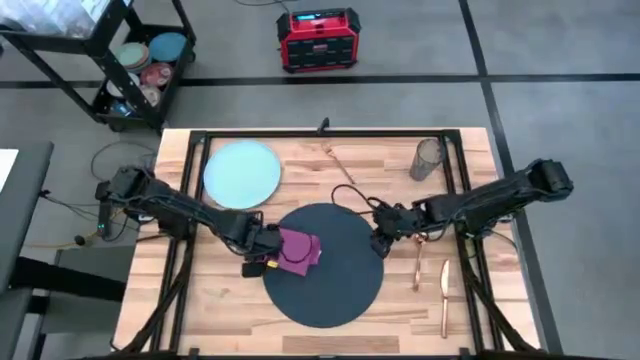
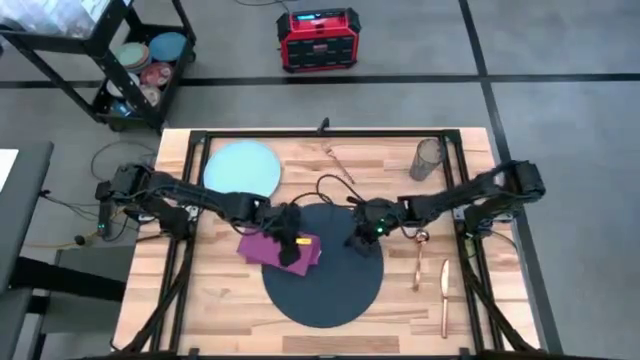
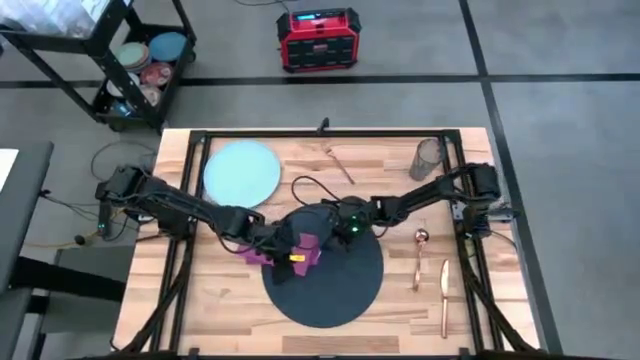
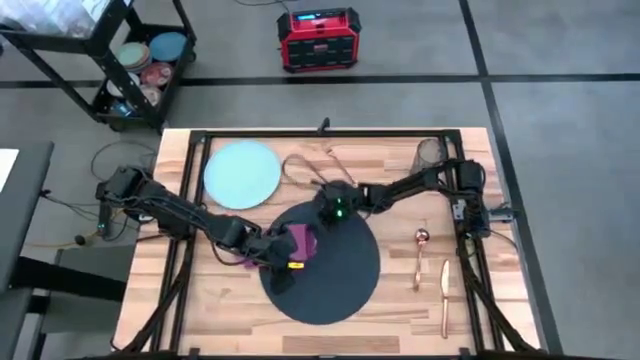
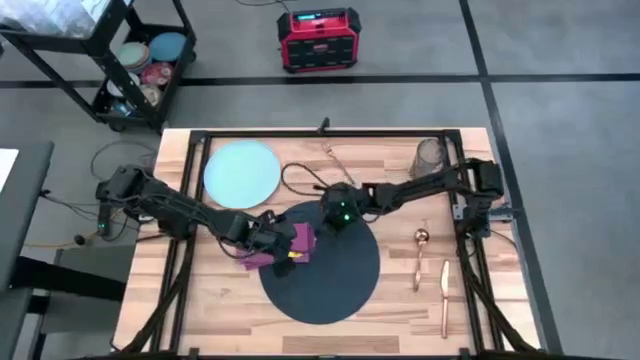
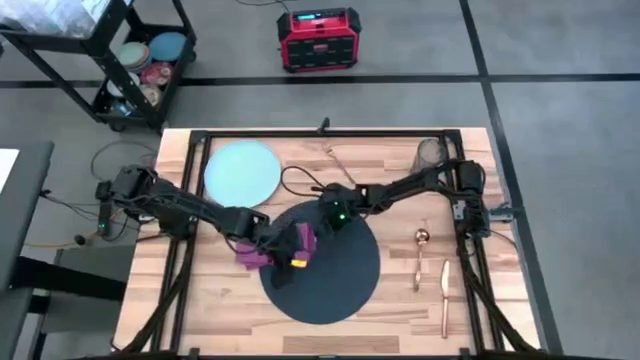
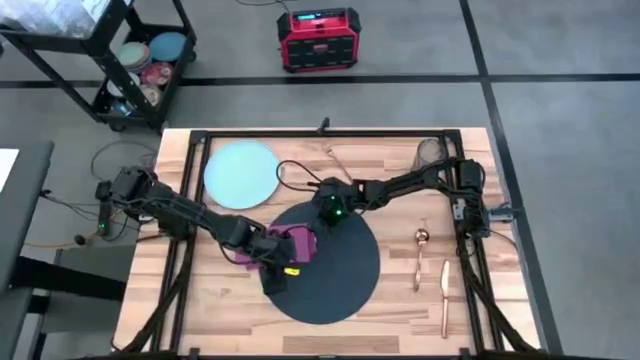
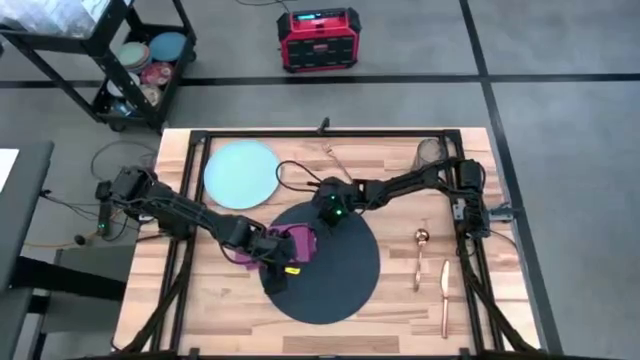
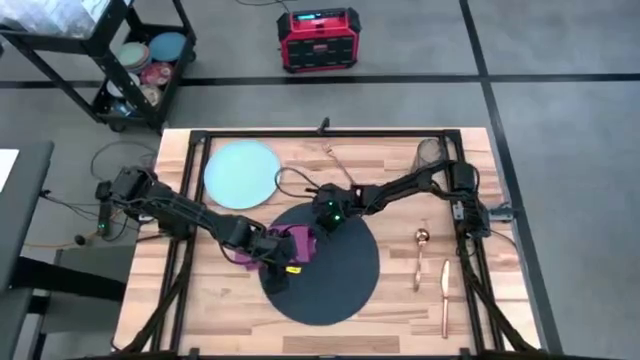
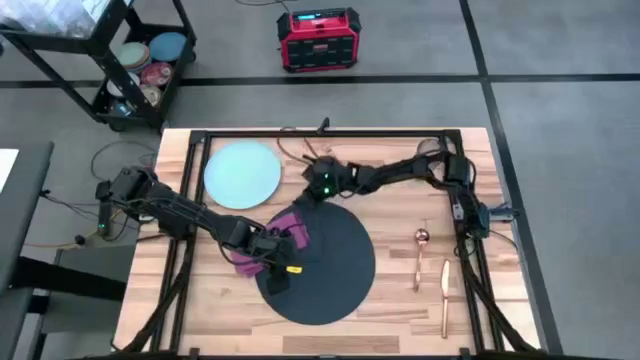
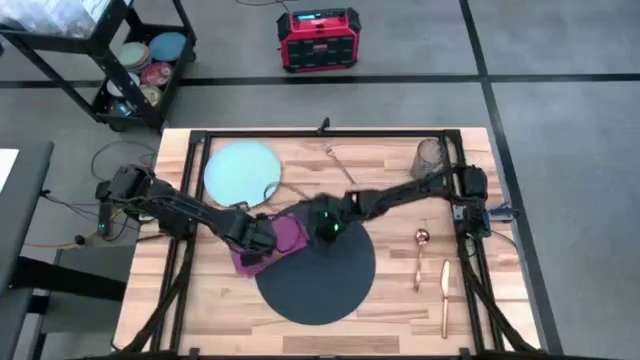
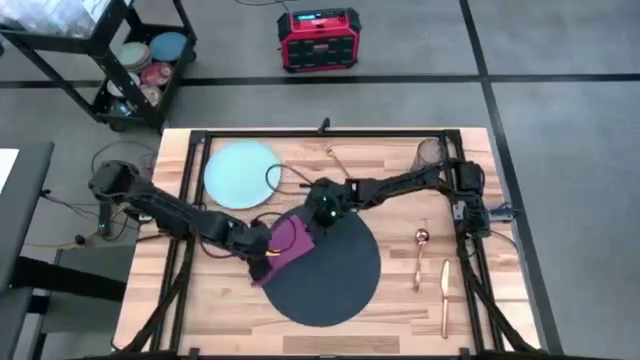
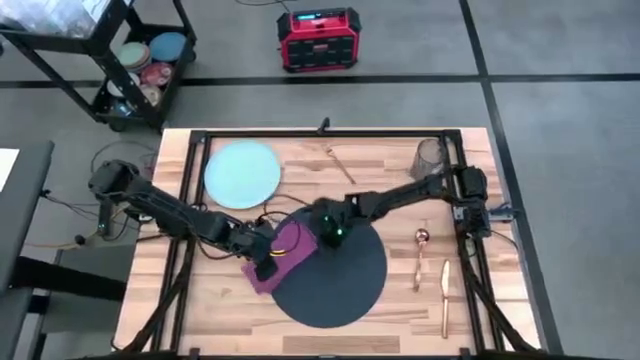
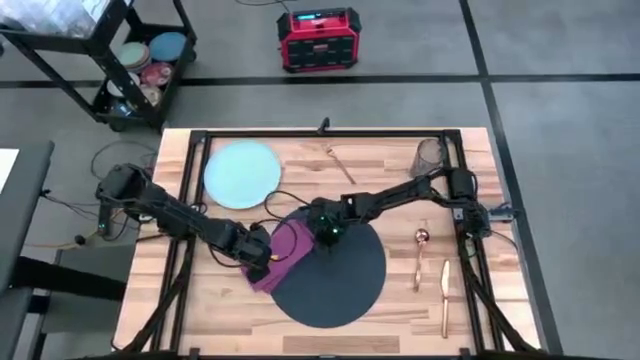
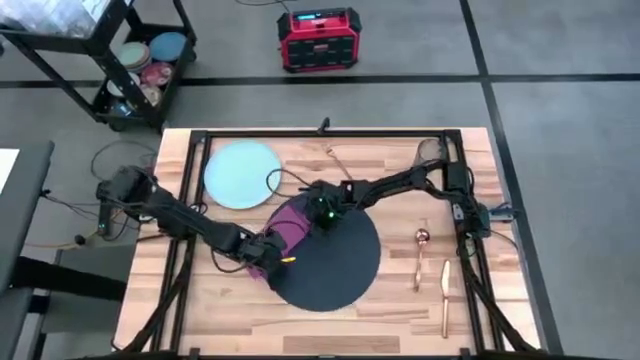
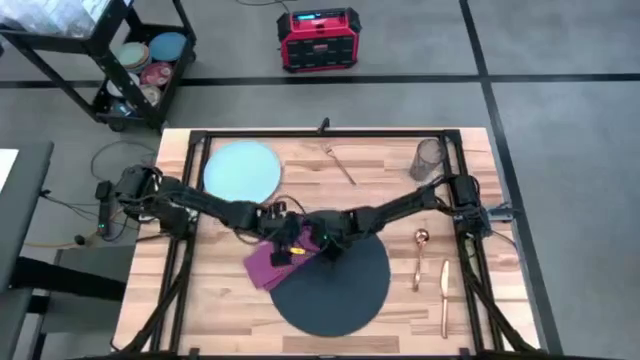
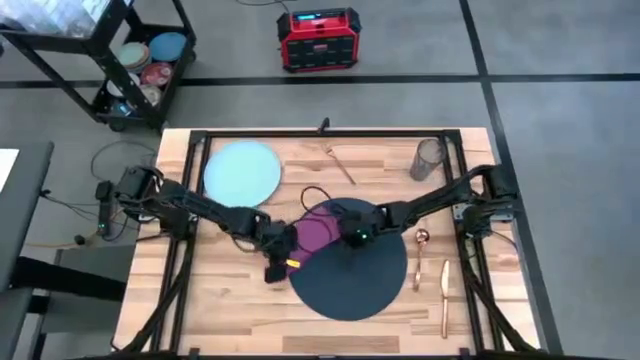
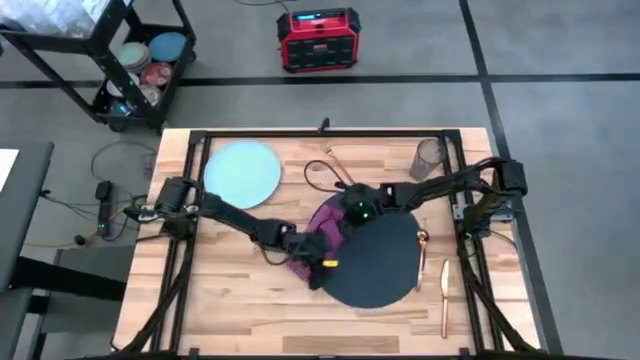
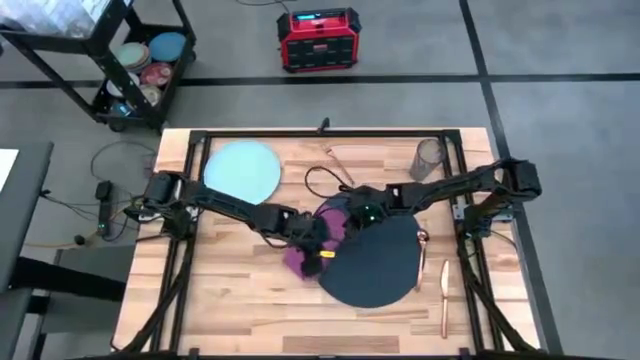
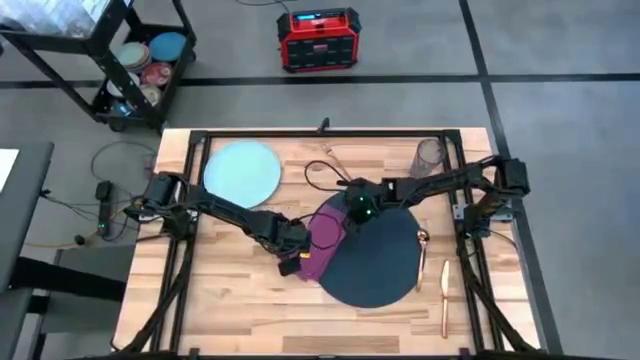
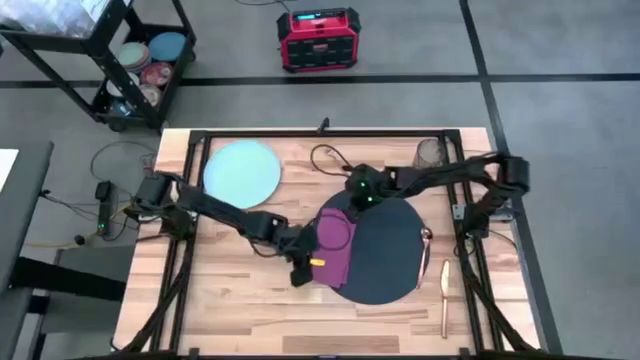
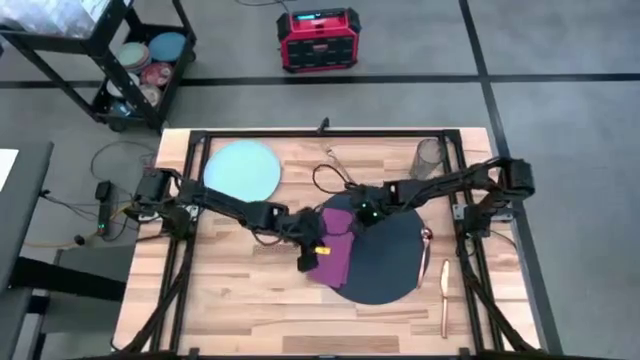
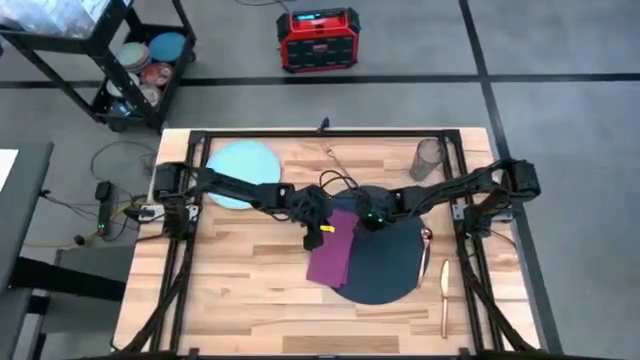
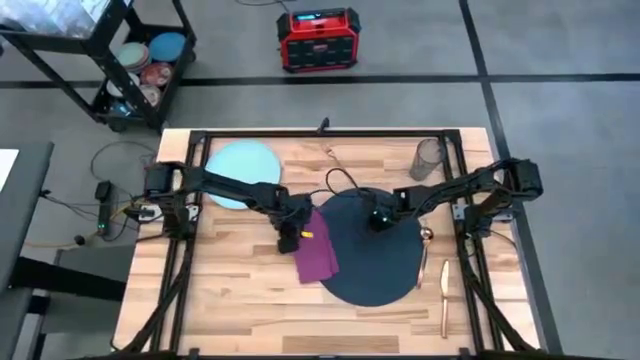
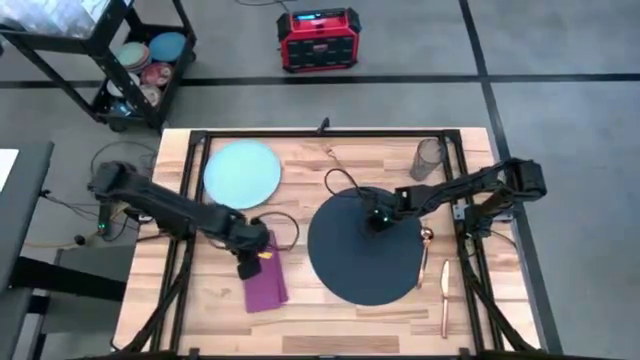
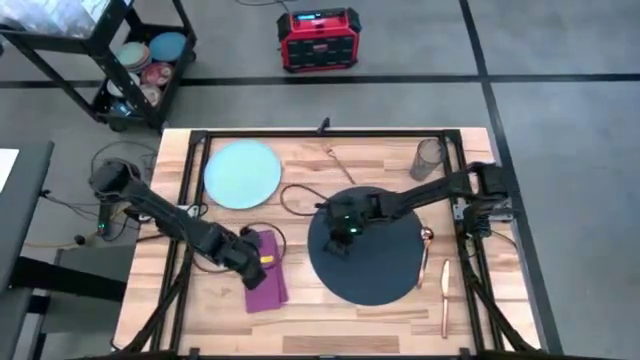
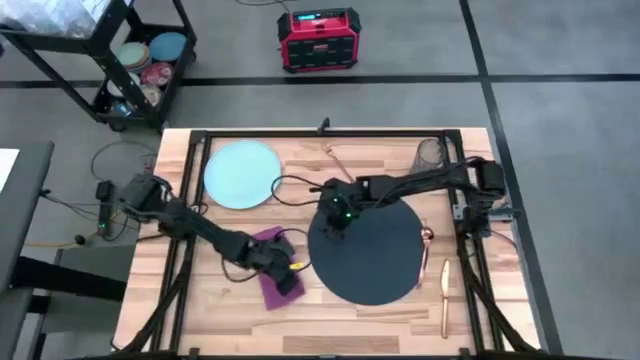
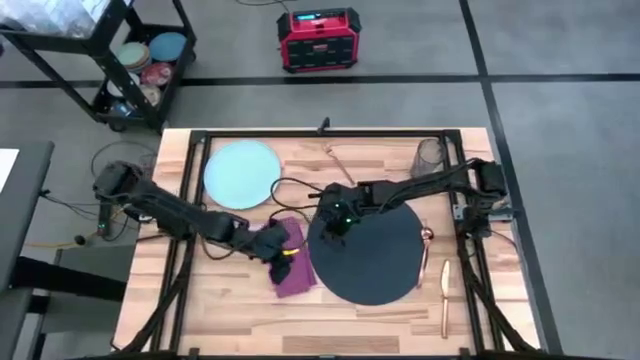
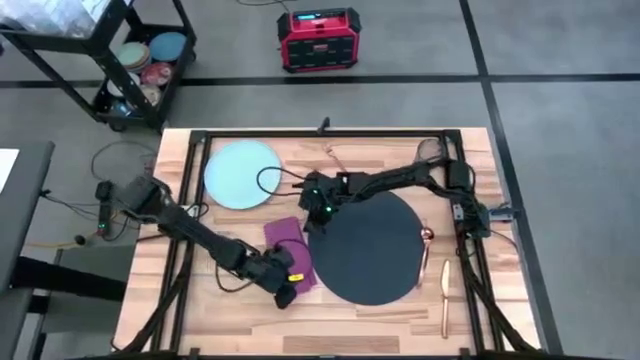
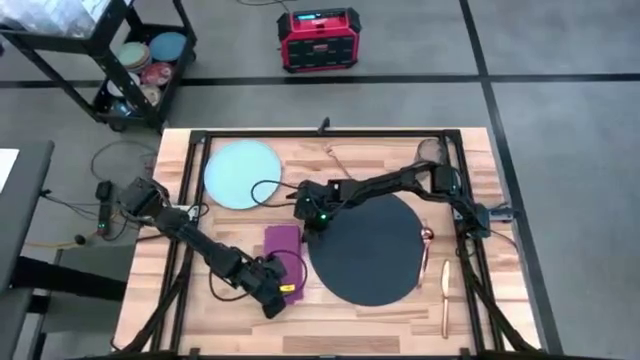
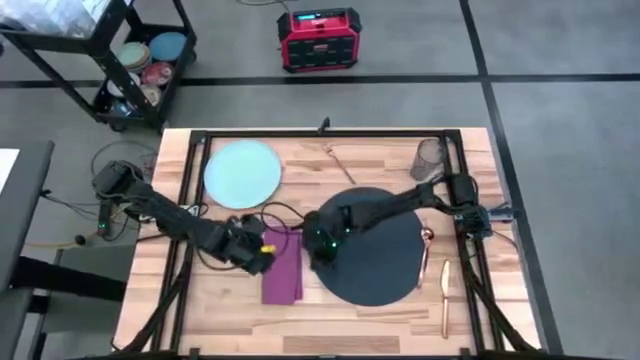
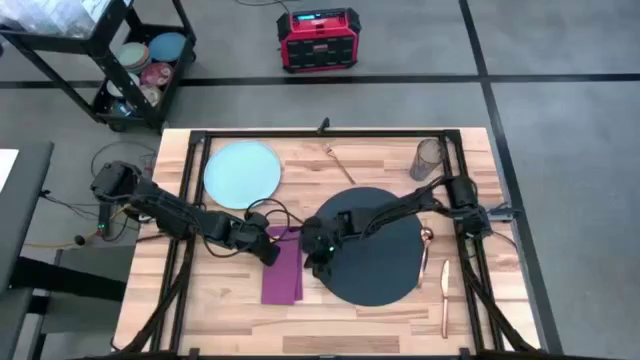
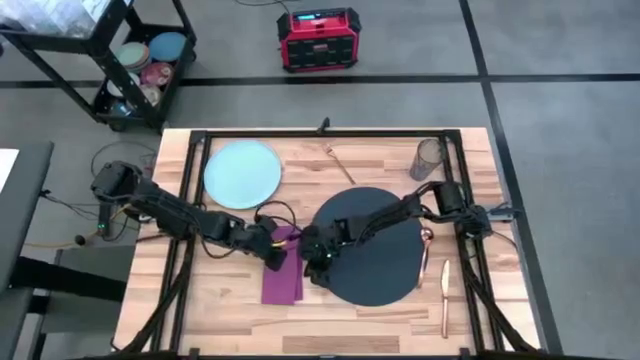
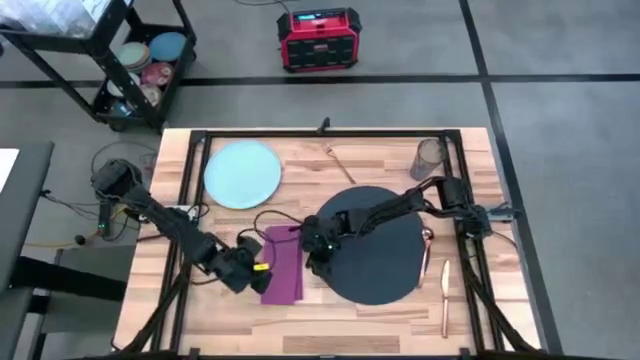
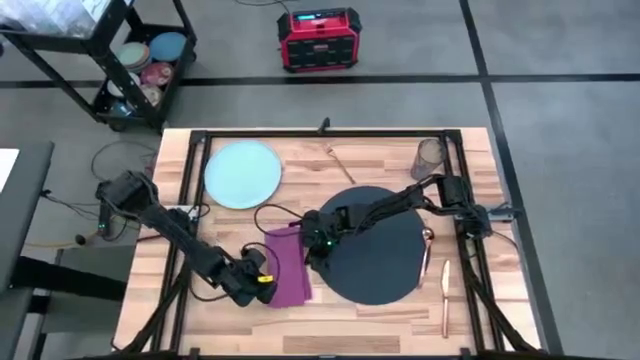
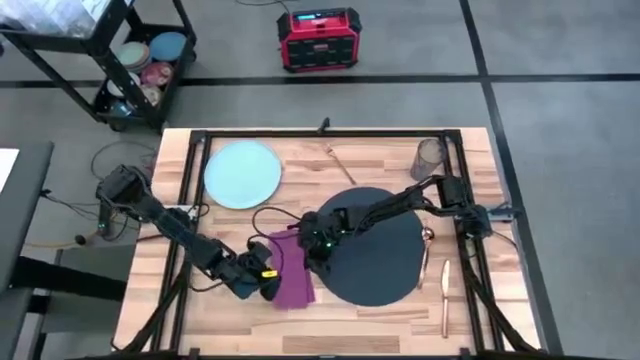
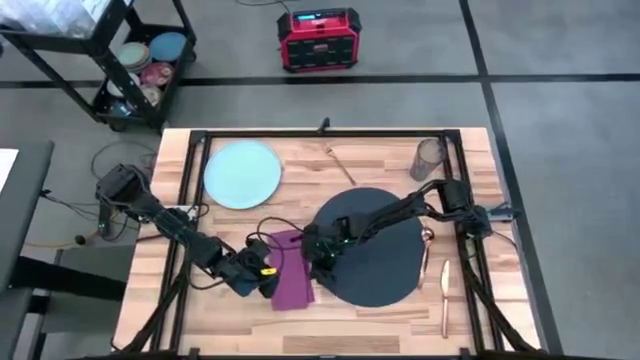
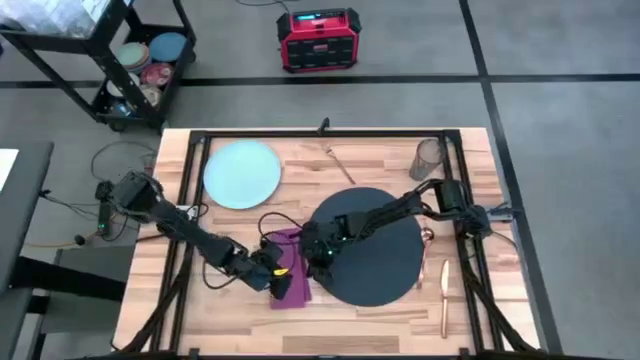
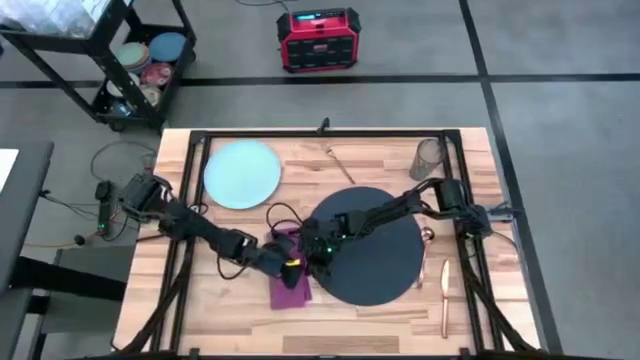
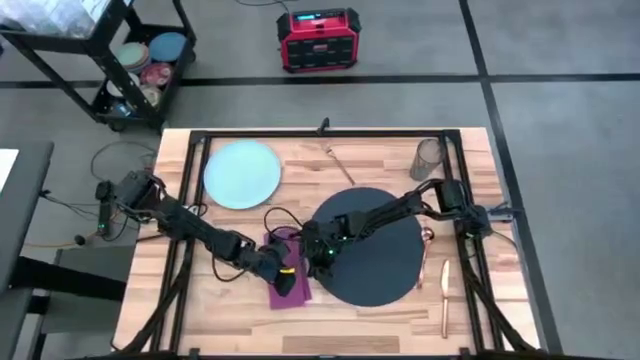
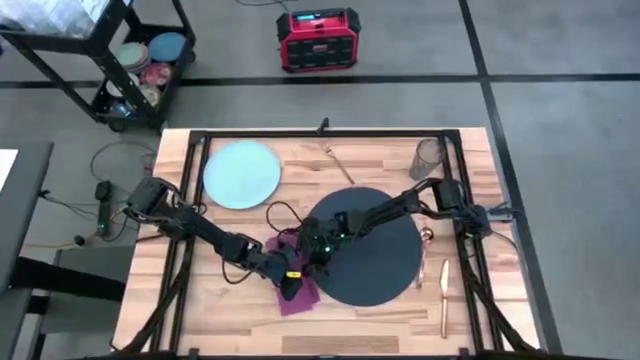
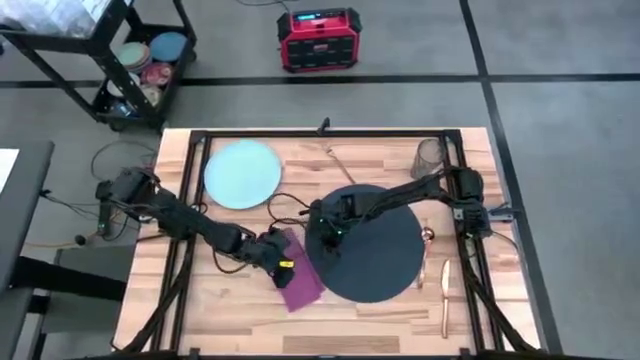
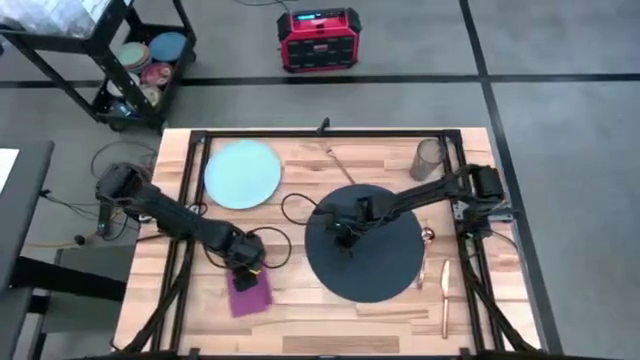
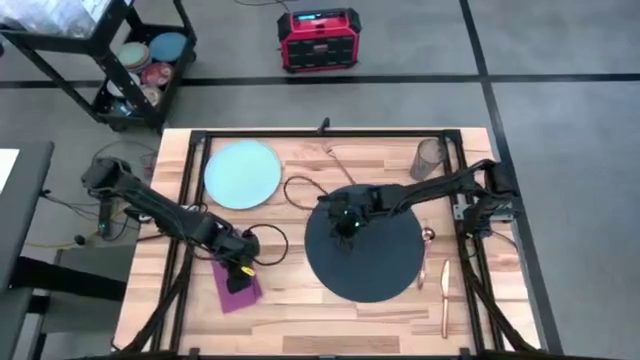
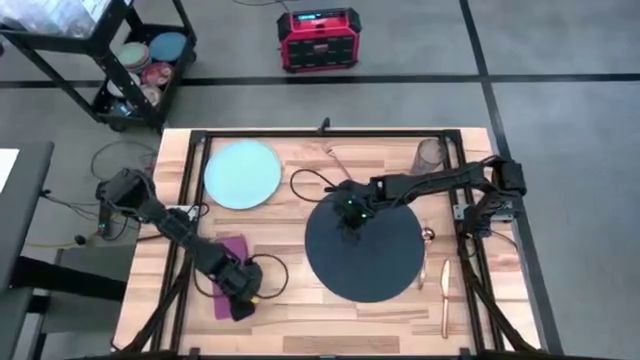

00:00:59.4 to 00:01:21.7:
Task: Set table place
Fold the pink table napkin

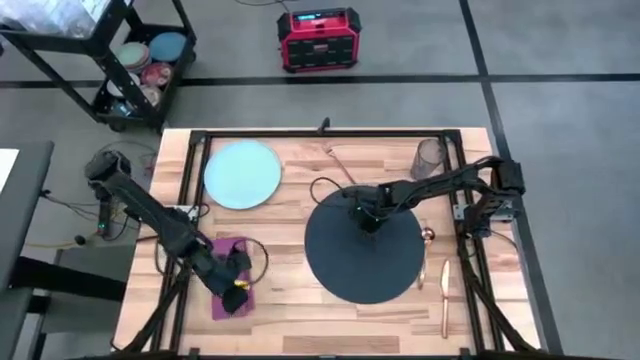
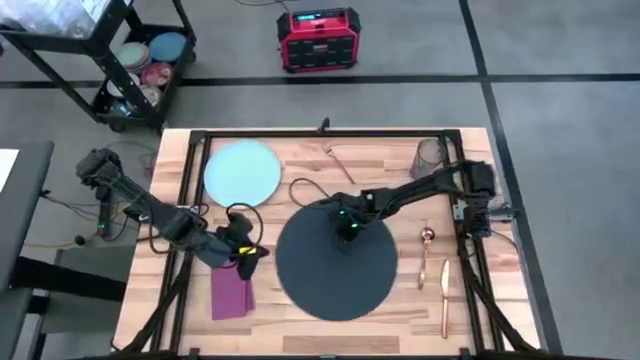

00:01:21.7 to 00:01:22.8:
Move the gray table mat to the center of the table
